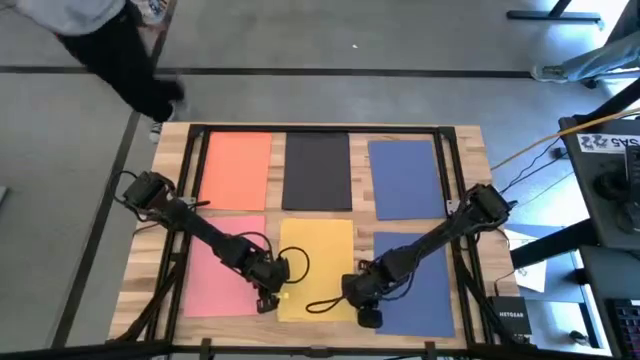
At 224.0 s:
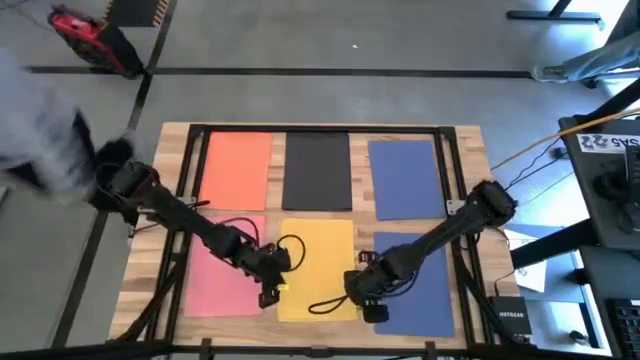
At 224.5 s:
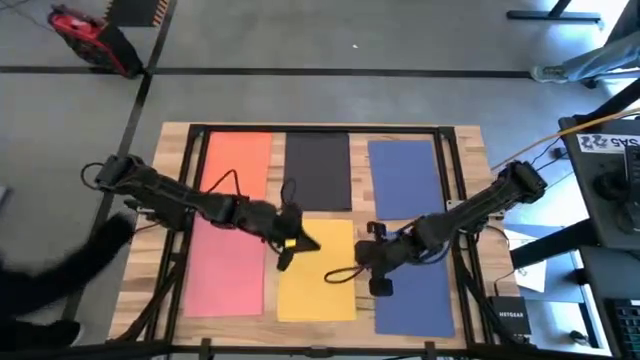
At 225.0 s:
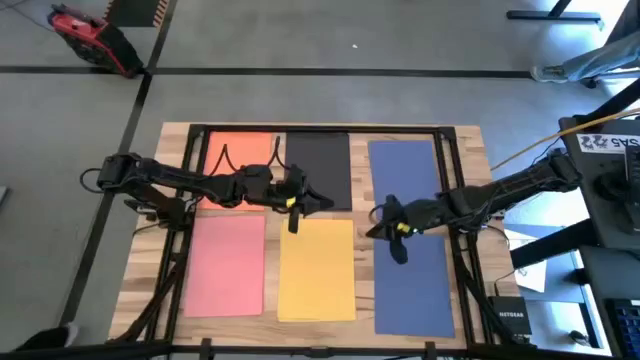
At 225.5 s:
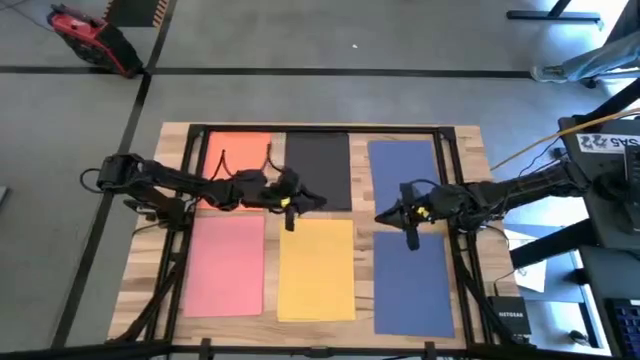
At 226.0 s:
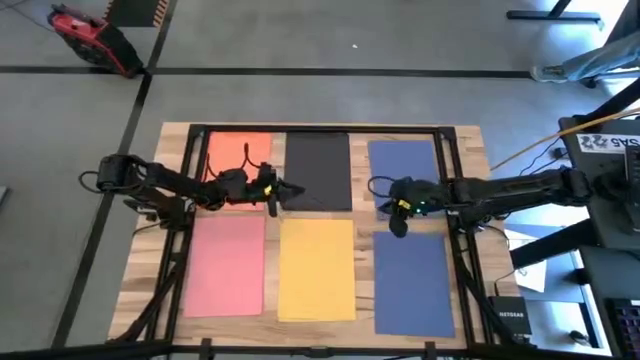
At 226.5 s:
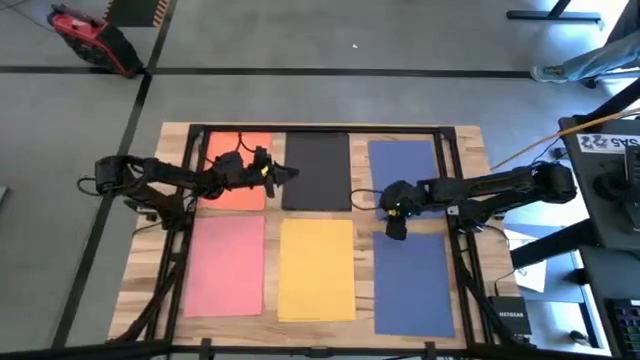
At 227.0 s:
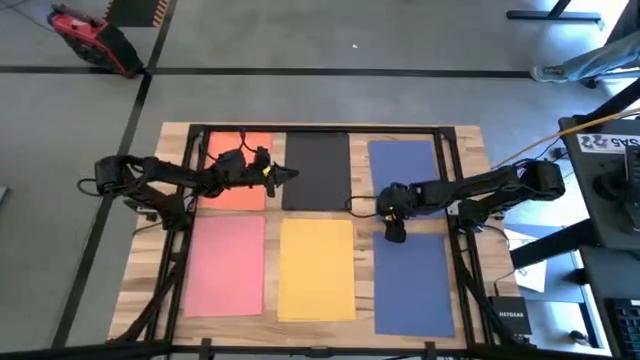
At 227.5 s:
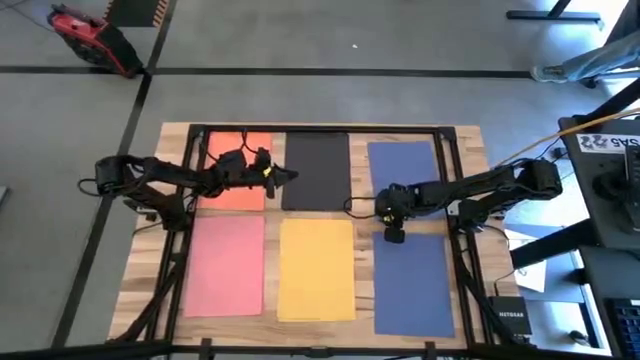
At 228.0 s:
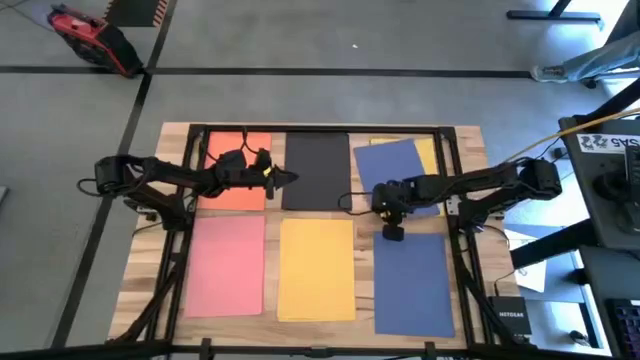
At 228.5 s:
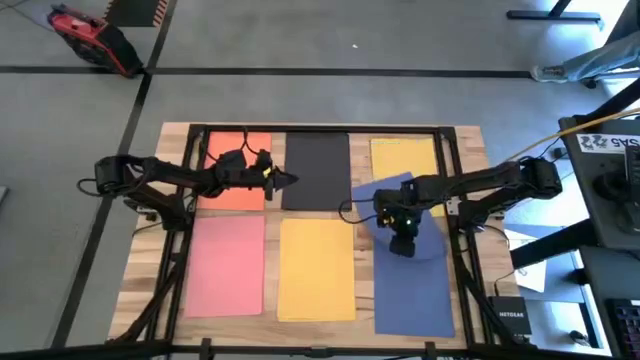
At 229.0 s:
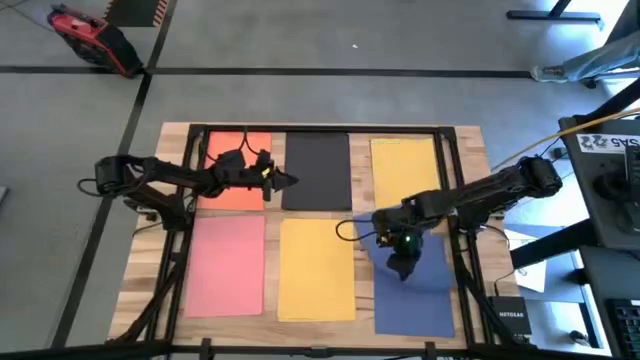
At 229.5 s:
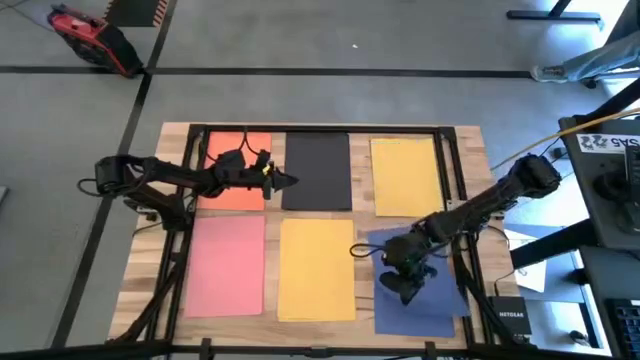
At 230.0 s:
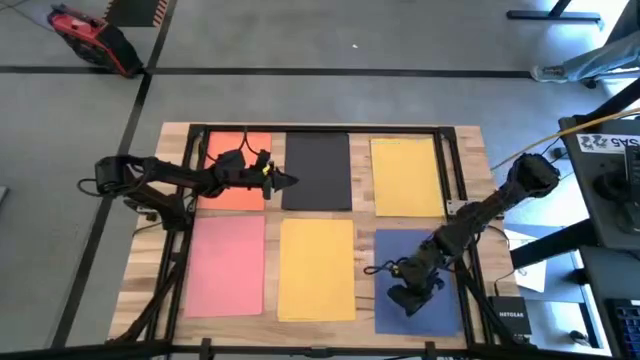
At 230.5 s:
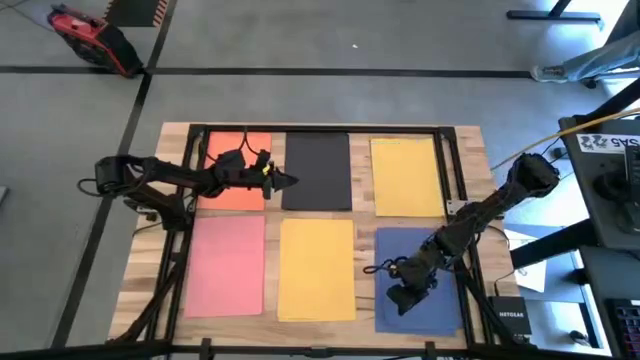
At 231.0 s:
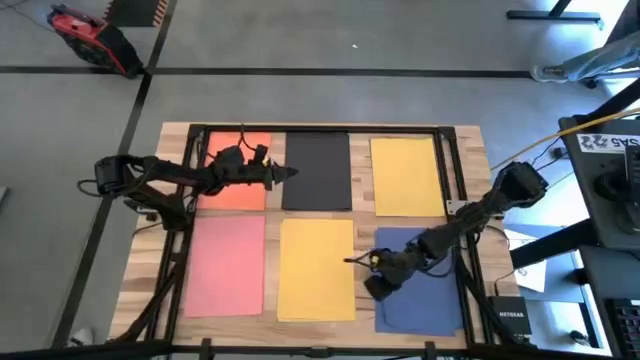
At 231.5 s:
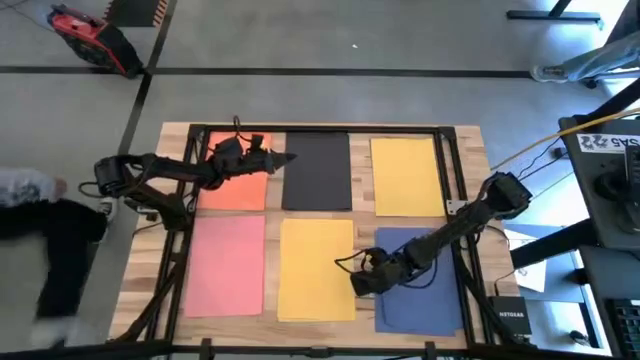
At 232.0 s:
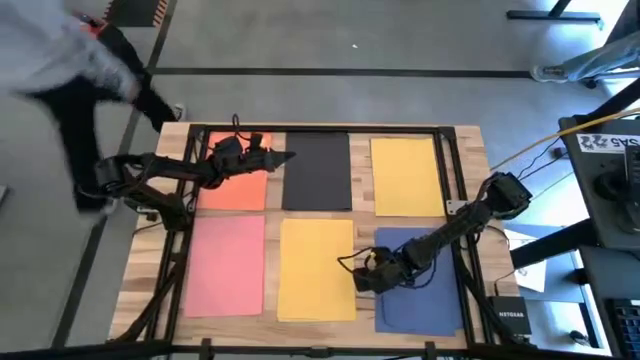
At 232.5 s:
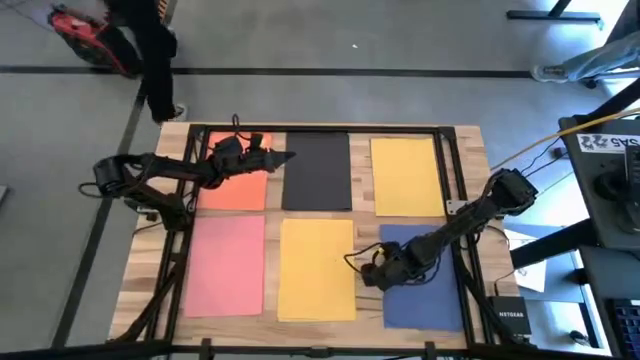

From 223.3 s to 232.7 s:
Task: Organize paper
Stack the blue color paper on top of the other blue color paper

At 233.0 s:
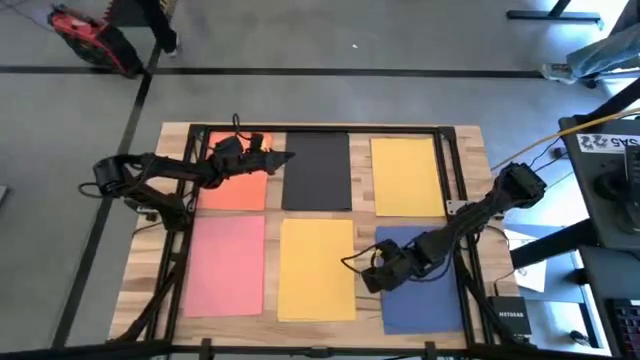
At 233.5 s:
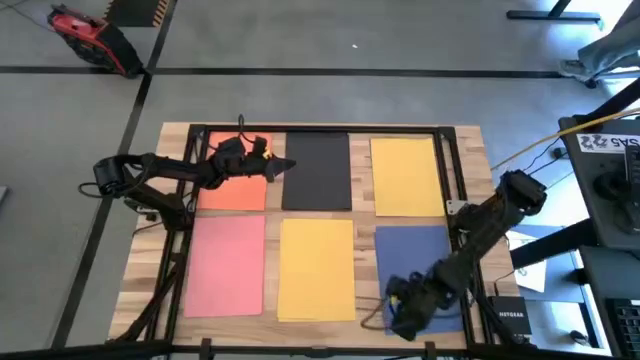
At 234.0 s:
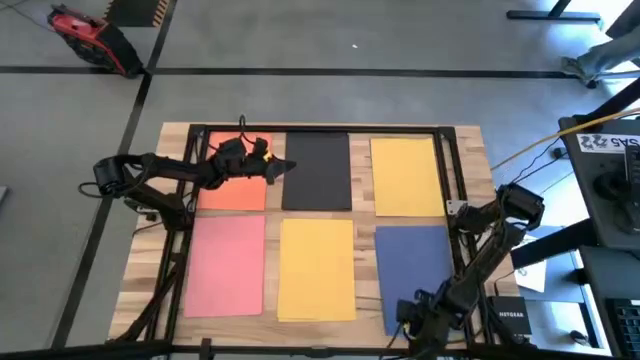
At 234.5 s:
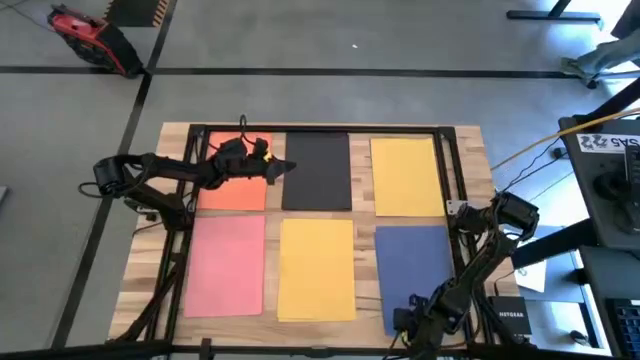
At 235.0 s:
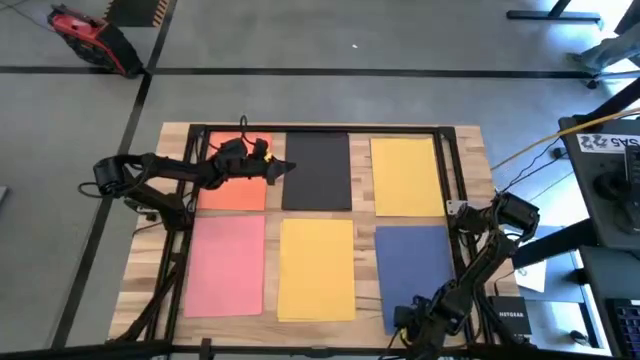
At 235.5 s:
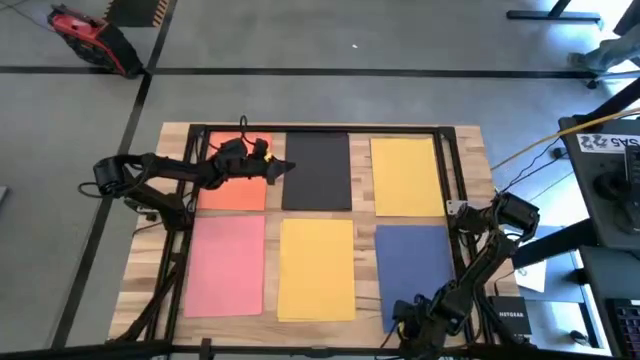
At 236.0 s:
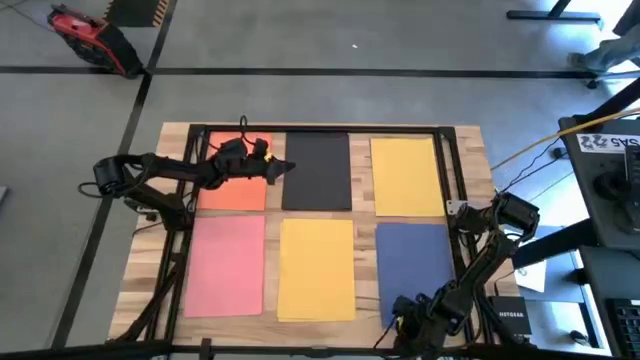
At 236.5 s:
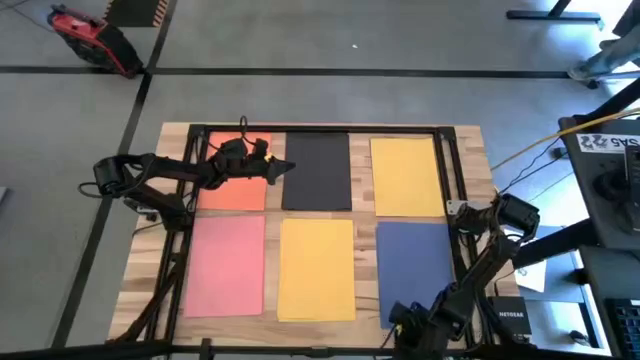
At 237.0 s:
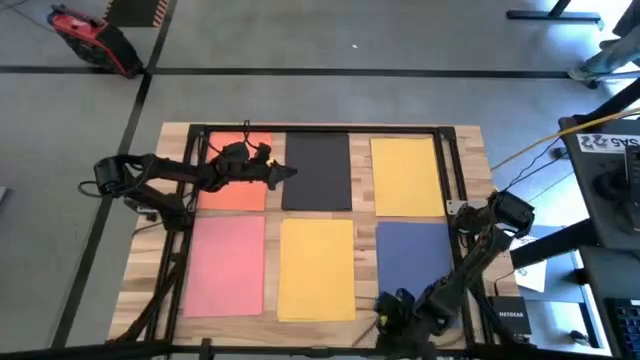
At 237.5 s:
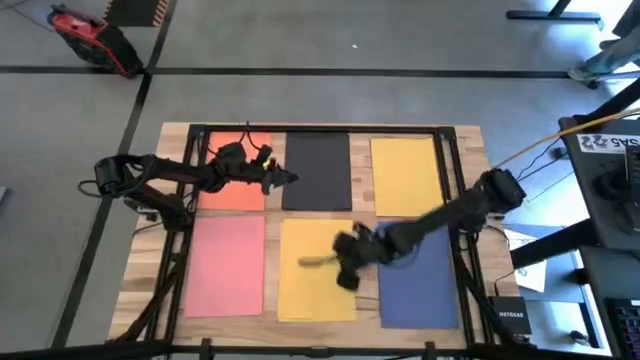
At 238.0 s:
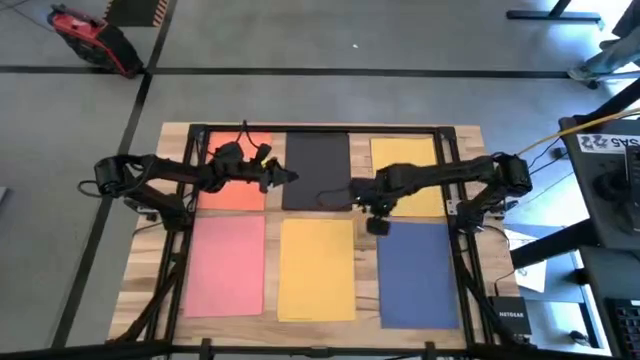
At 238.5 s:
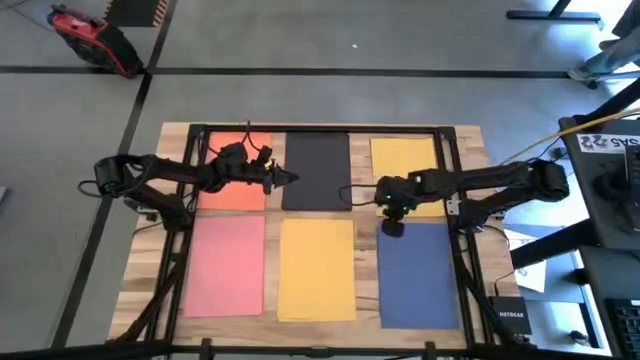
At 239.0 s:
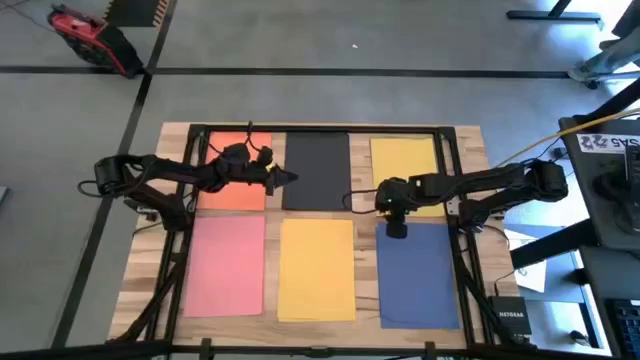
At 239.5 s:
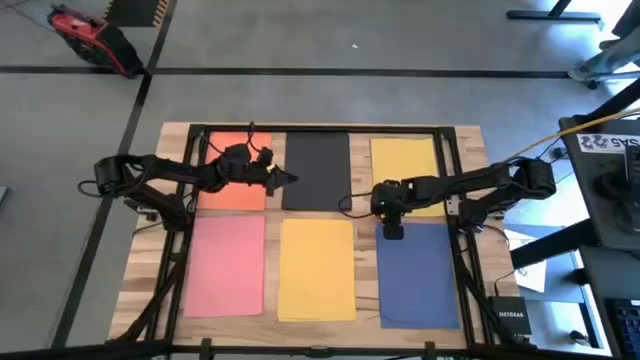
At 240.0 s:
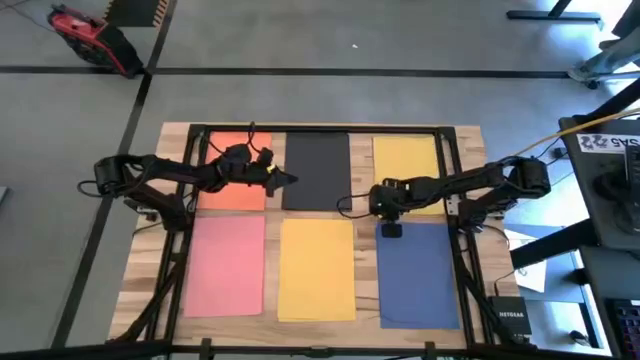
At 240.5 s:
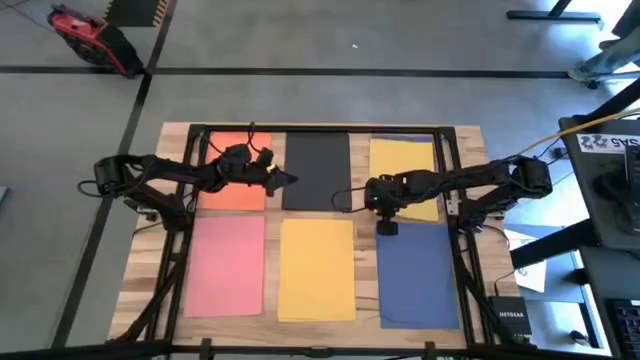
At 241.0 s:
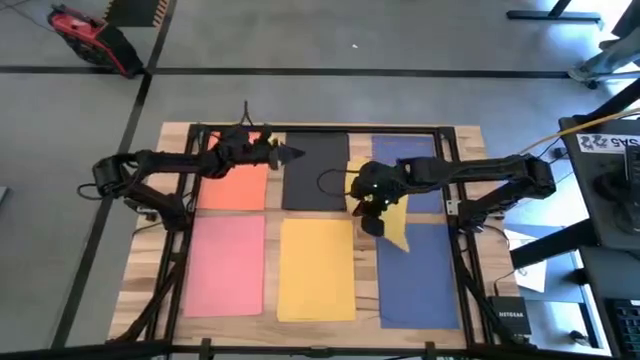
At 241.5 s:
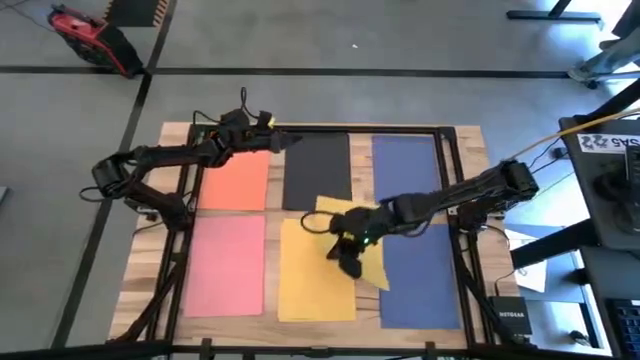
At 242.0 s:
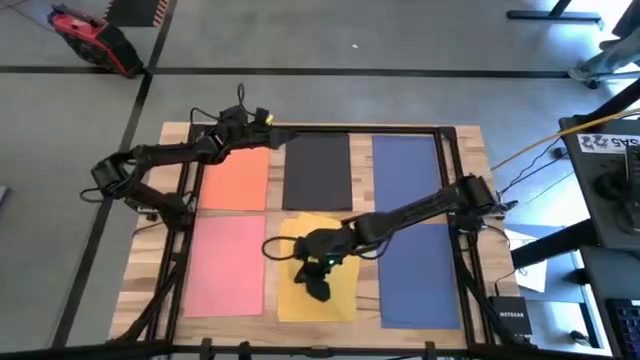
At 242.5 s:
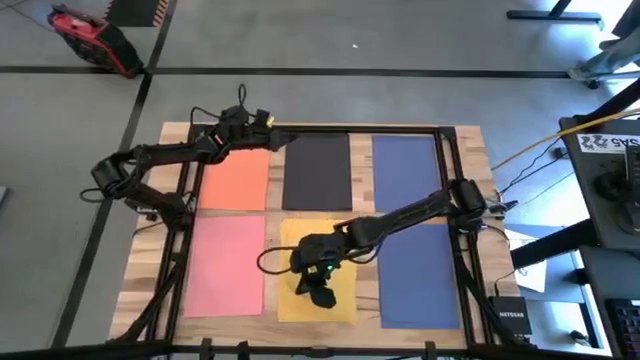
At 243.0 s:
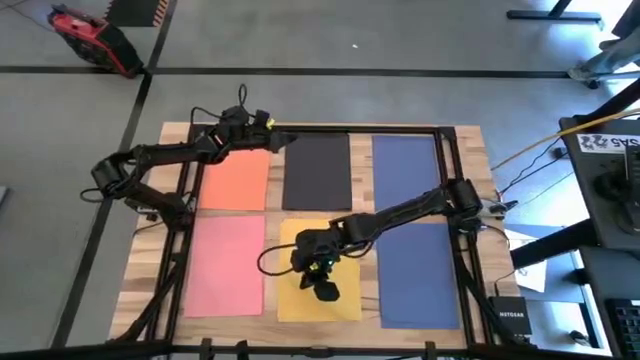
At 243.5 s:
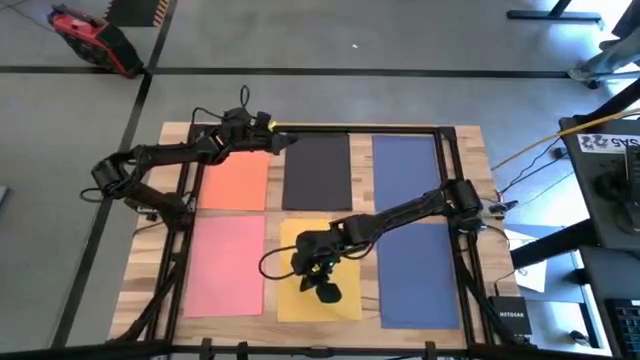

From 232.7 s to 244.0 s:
Stack the yellow color paper on top of the other yellow color paper
